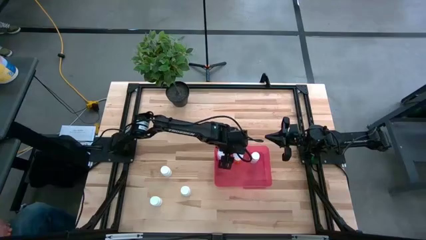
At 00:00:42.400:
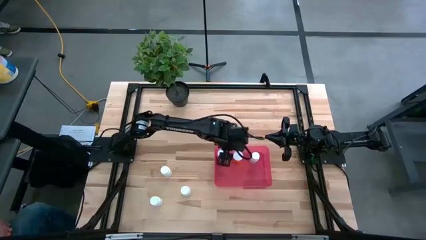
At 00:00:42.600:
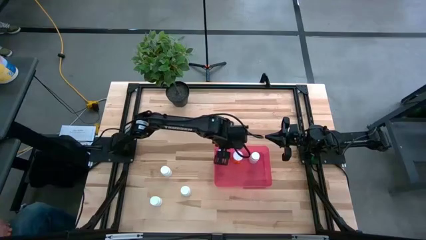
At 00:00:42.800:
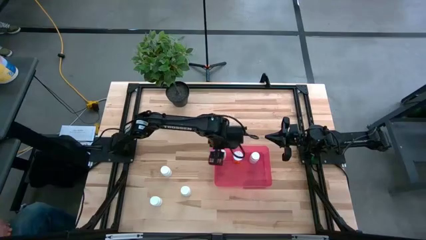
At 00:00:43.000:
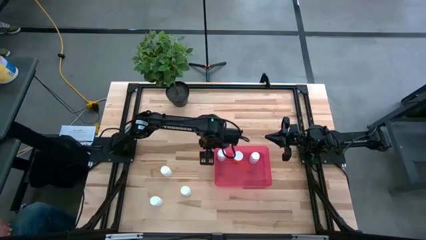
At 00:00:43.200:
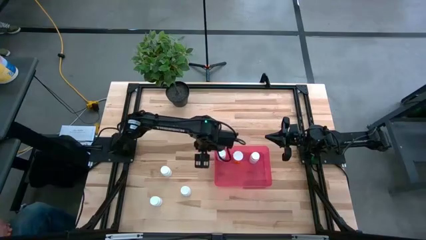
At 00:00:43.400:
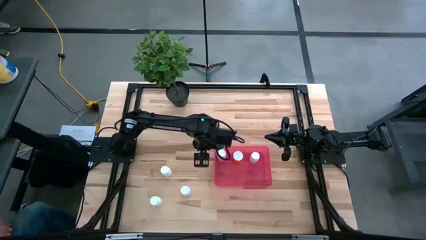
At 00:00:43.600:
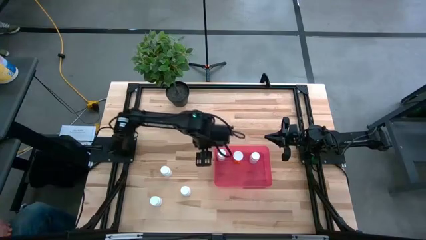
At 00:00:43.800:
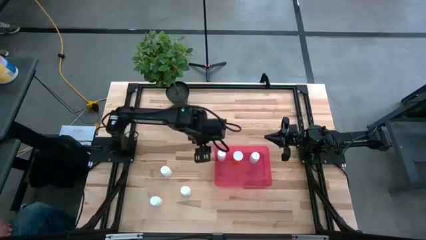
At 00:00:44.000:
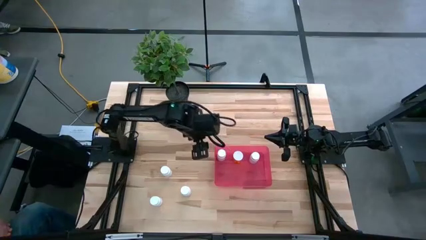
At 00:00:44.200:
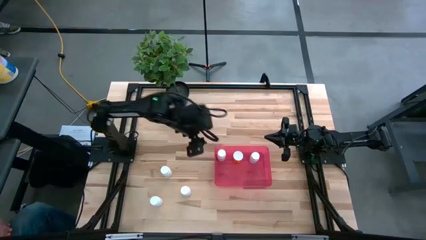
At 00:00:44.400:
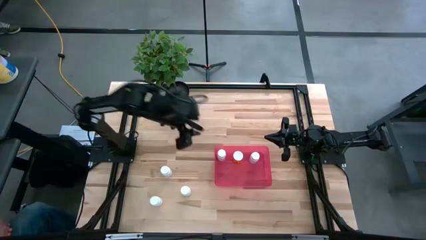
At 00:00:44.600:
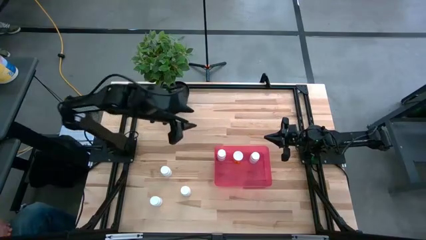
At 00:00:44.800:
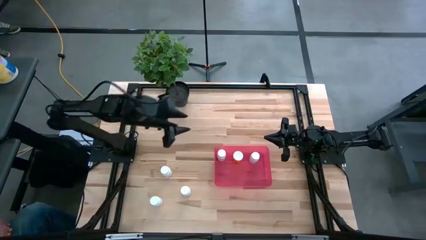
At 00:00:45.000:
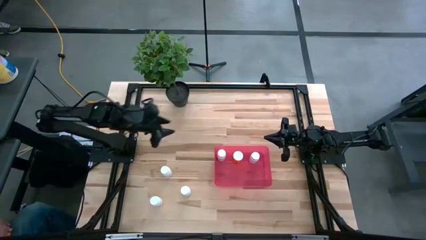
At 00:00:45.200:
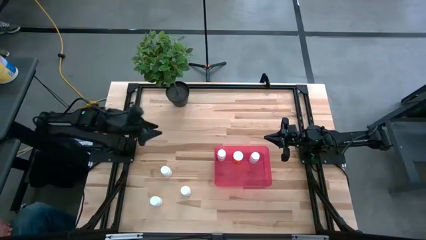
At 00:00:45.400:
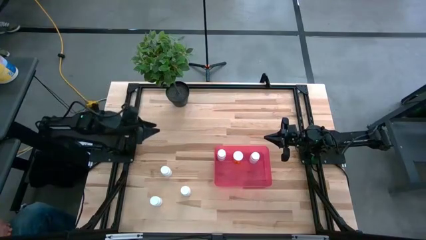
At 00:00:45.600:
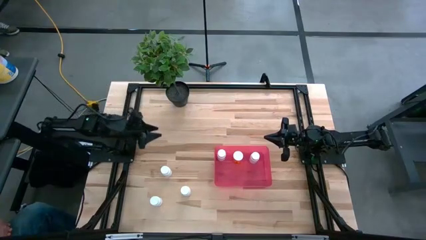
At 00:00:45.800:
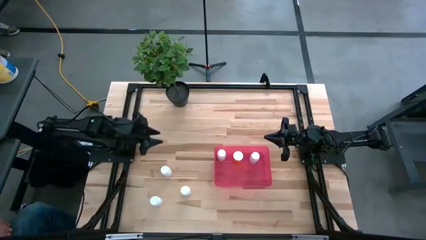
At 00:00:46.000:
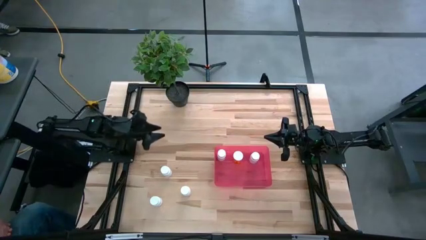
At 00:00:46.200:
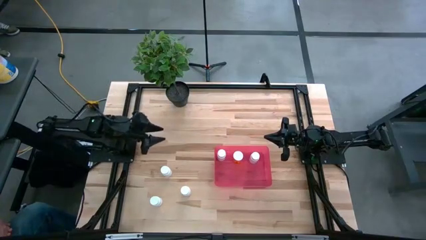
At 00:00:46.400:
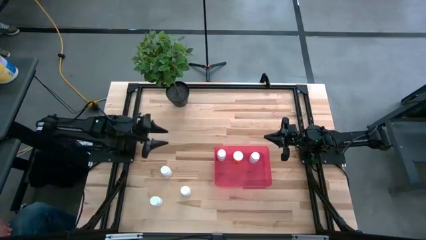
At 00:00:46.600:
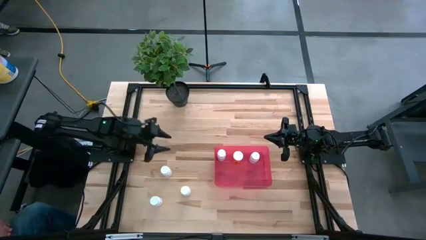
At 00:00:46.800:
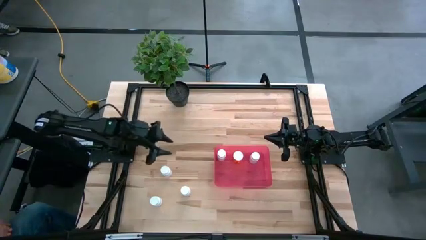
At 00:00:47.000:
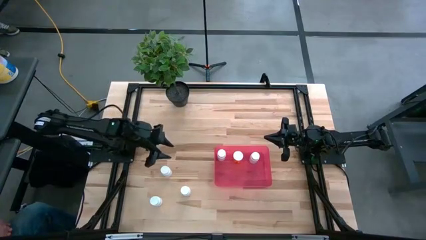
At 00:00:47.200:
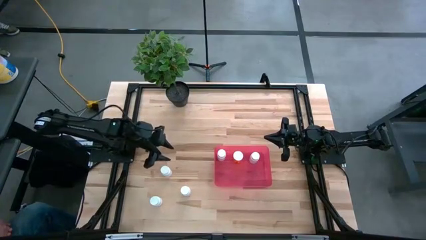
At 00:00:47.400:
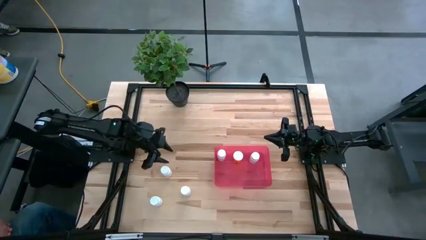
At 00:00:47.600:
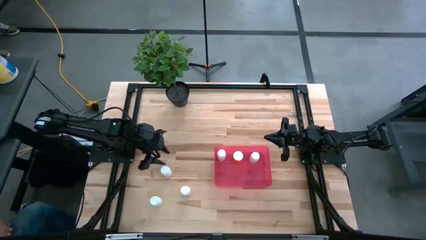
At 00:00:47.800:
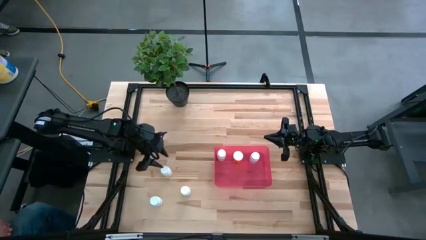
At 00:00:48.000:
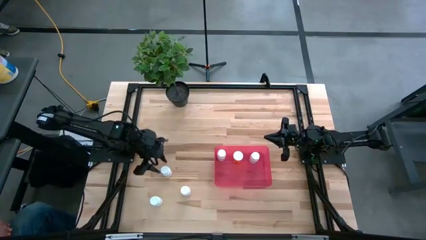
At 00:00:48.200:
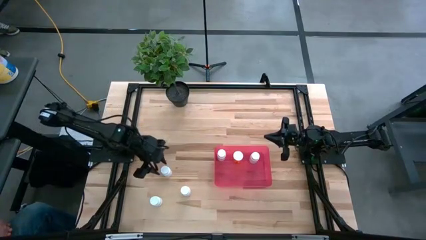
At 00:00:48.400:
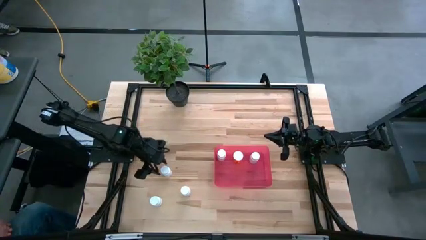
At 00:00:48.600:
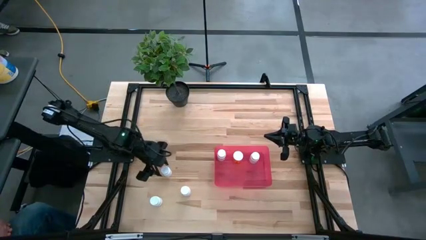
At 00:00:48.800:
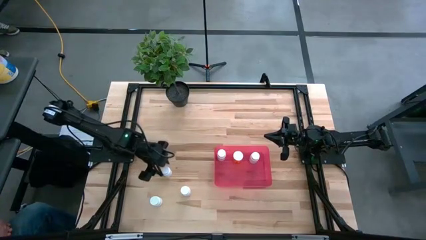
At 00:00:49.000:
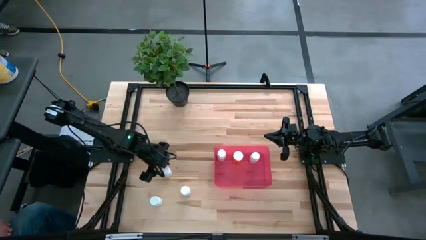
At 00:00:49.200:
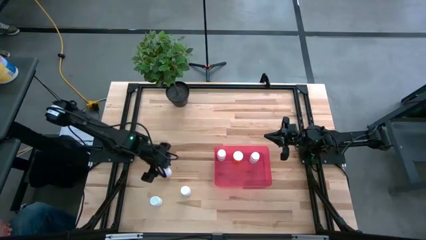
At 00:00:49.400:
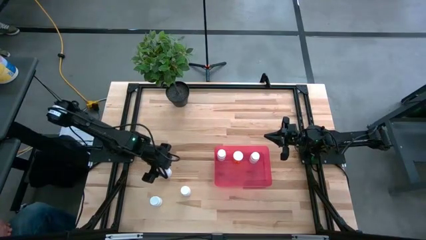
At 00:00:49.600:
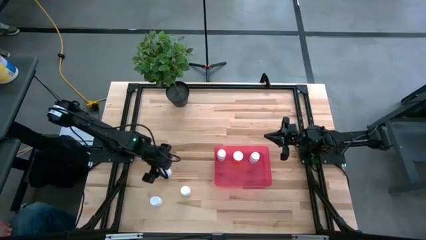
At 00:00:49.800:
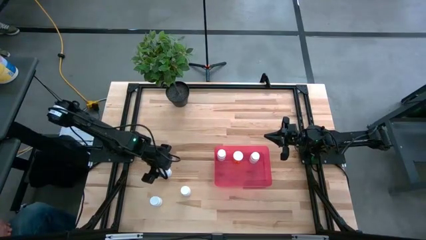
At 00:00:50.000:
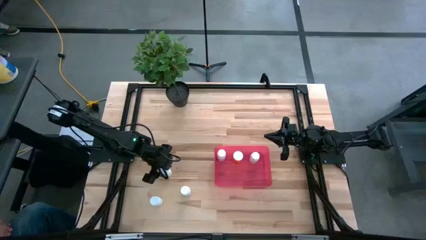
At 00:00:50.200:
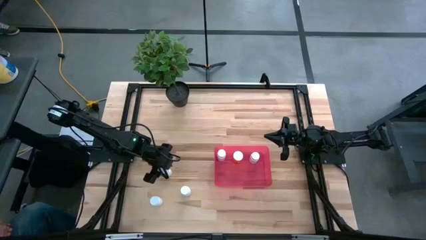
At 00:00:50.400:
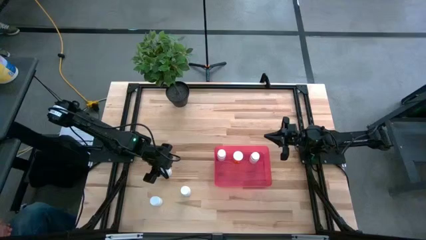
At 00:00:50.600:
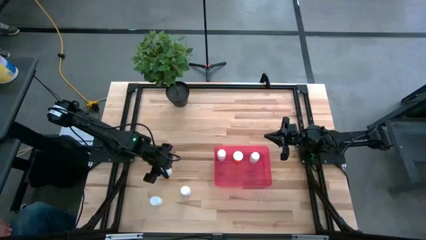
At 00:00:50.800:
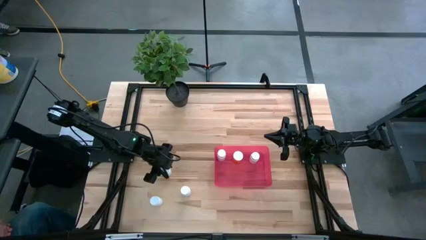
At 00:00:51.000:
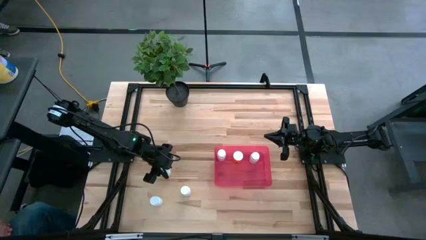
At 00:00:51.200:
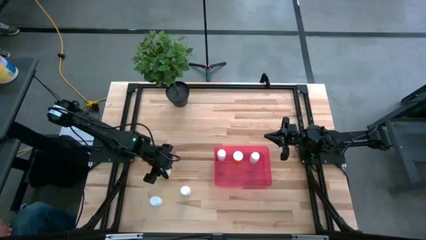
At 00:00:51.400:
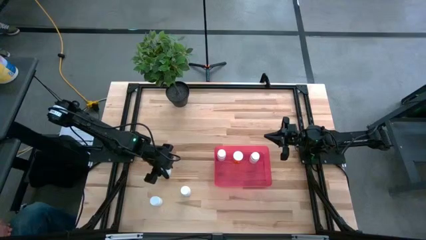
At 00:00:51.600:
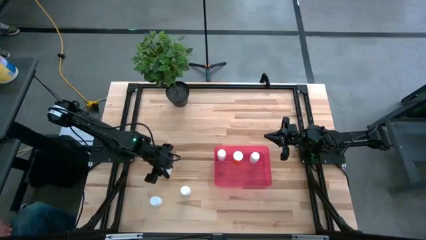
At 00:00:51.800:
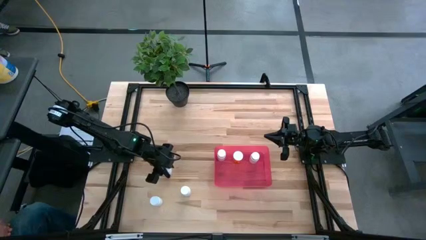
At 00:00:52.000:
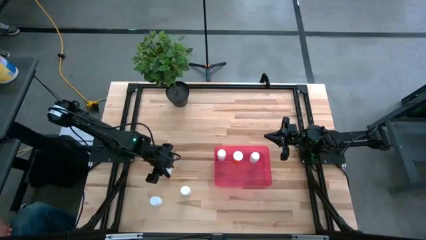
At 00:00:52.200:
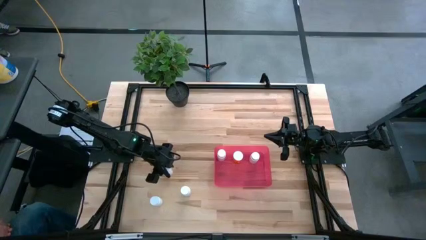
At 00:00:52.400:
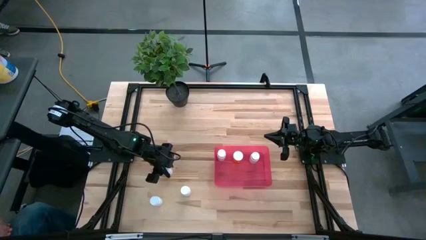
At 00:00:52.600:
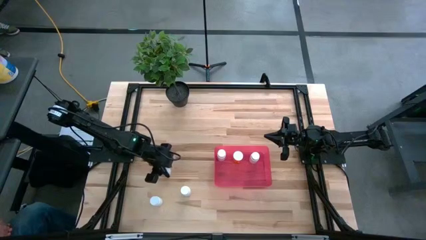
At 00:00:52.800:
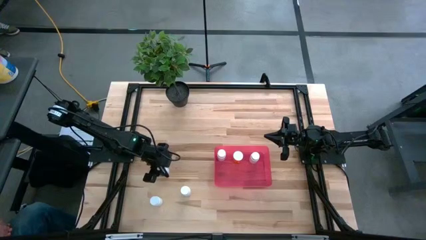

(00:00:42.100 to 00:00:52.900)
Task: Pick and place pill bottles into a basket
Put the white pill bottle into the pink bin

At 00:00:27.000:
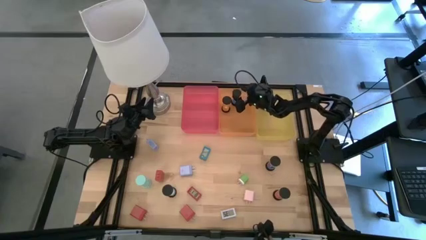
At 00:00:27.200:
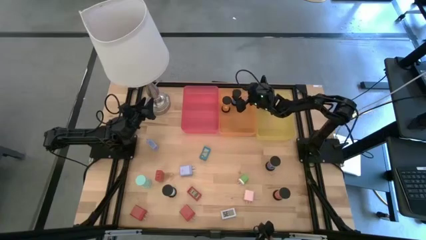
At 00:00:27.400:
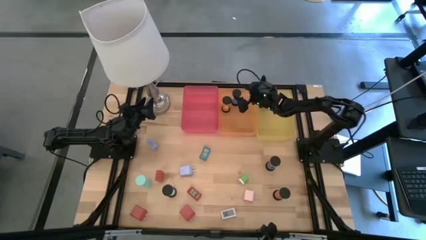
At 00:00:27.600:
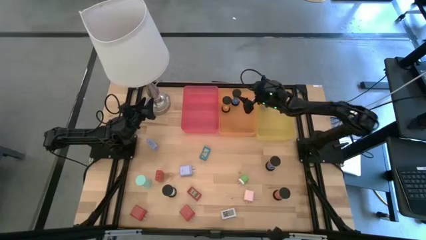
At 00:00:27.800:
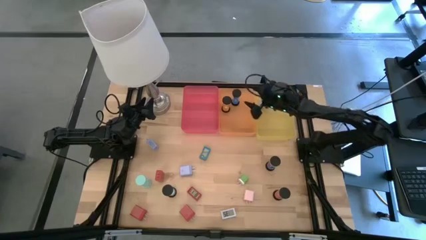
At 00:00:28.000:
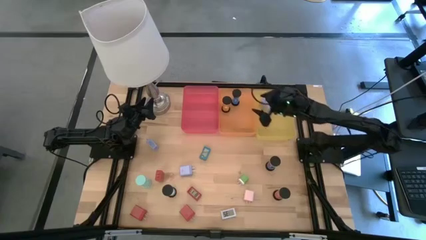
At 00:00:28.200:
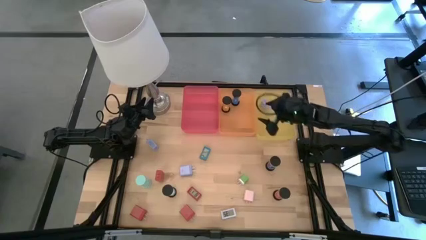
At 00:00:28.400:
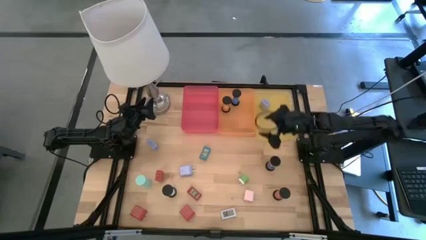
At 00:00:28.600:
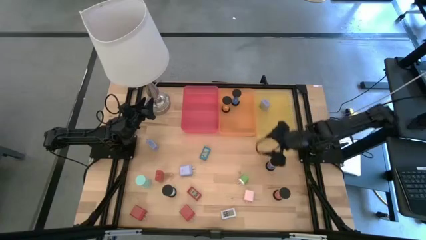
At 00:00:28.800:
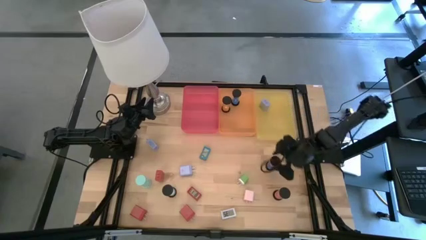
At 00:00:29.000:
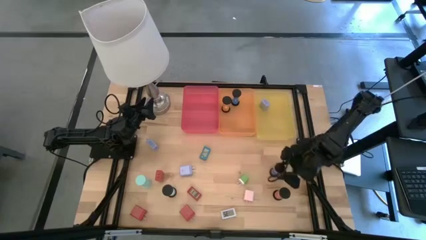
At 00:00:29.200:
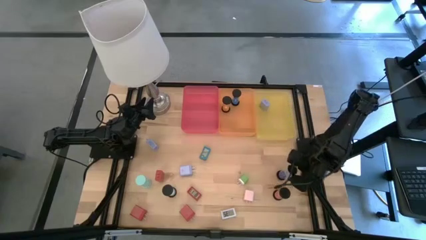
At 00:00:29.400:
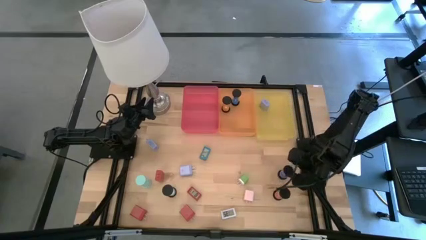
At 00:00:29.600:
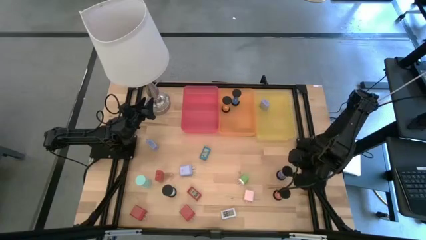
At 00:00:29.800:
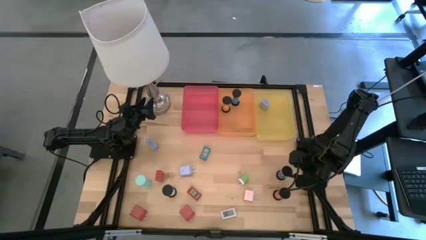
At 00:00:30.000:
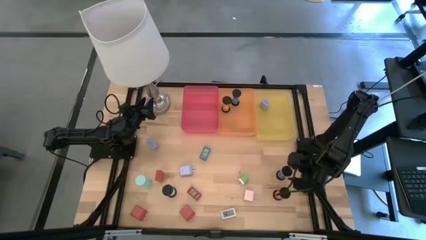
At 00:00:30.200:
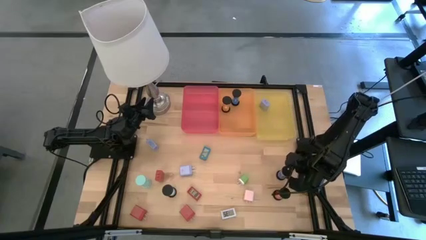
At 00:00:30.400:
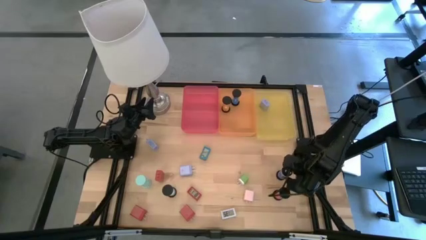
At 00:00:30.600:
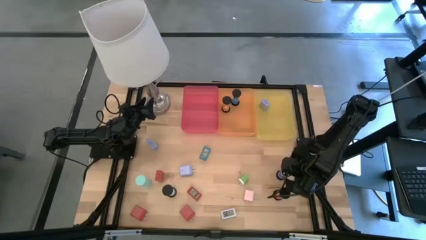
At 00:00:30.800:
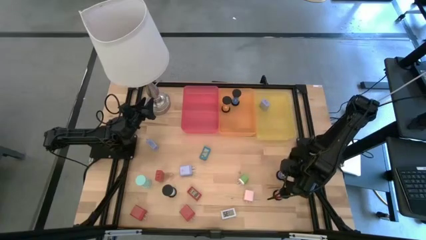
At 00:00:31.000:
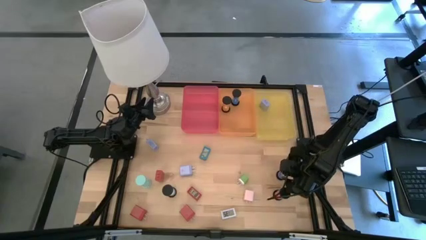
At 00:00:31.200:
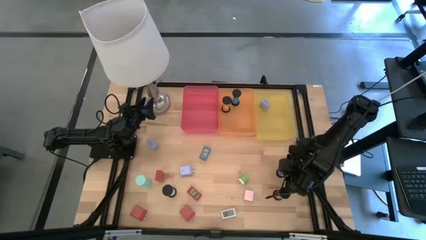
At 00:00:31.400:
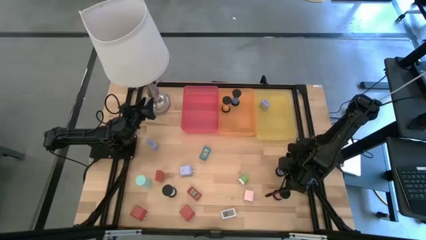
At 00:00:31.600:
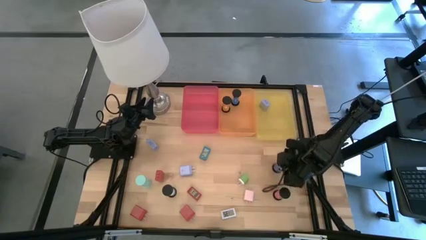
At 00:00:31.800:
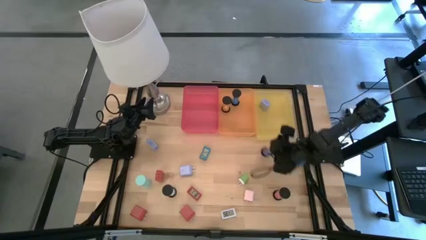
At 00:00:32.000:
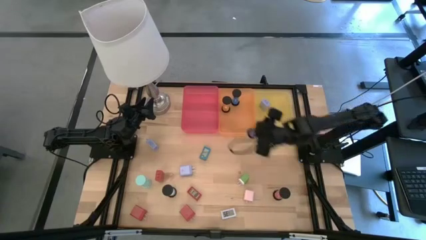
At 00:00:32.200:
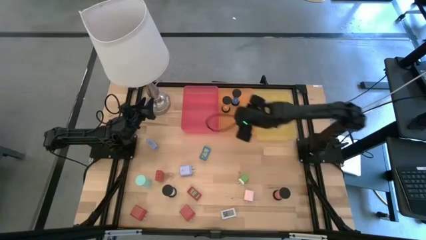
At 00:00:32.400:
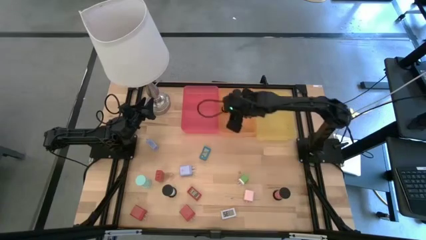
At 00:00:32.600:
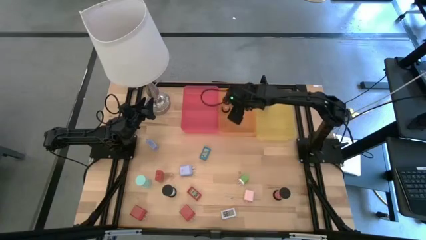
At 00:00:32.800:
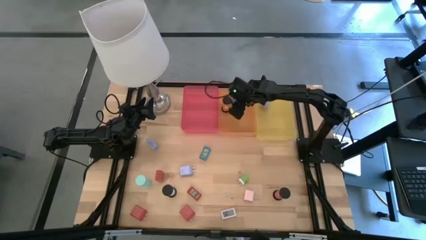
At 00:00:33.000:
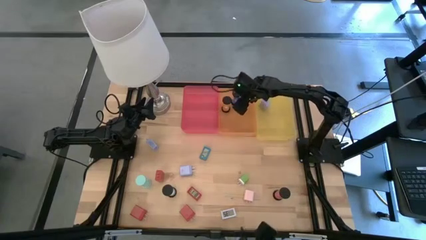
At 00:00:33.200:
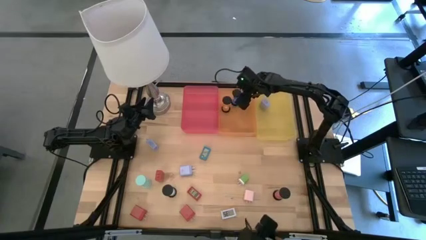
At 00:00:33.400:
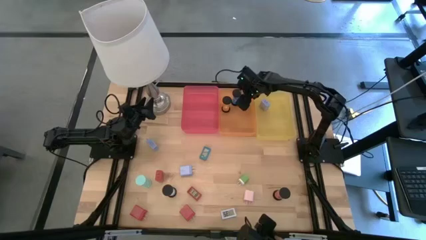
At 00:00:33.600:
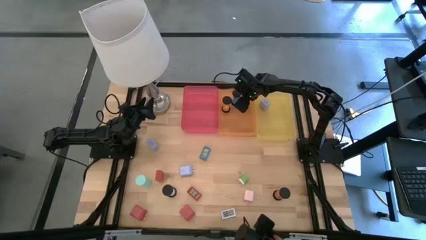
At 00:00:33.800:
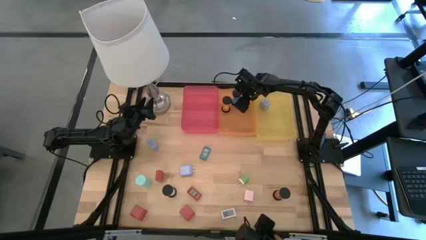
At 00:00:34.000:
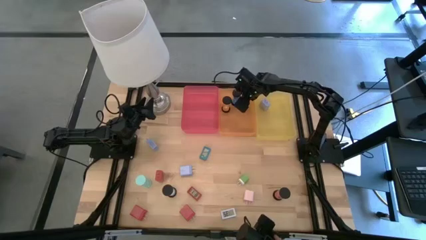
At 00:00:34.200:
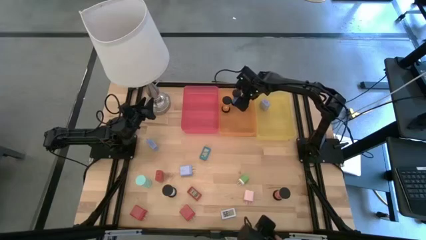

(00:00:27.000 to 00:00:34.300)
Task: Pick & Place Office items
Put the blue hourglass into the orange bin
